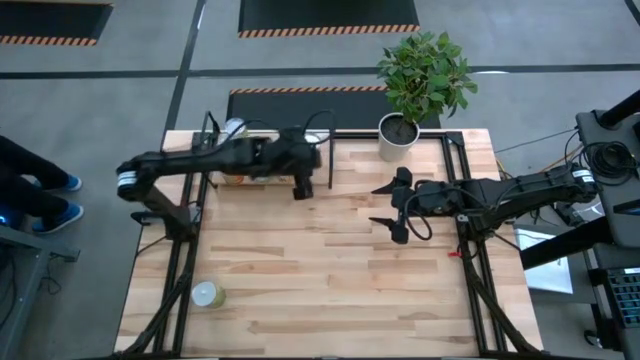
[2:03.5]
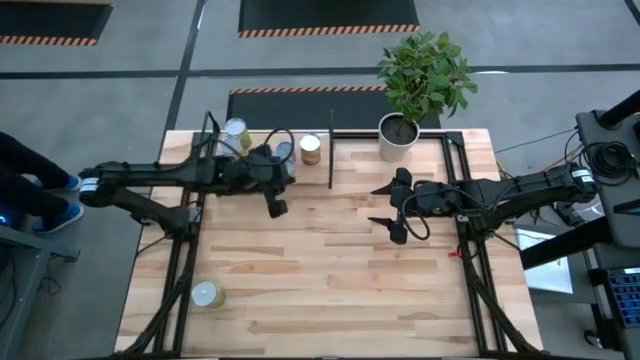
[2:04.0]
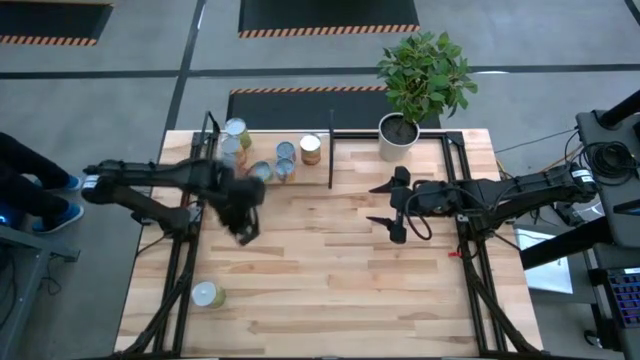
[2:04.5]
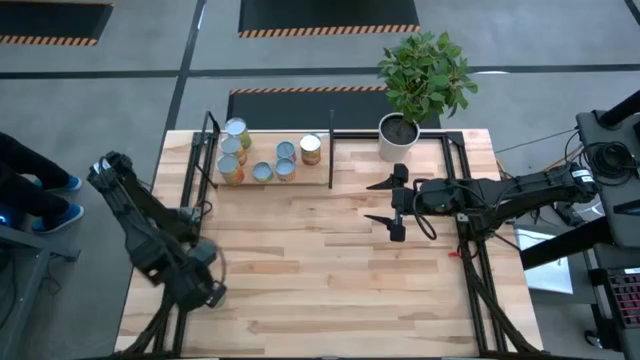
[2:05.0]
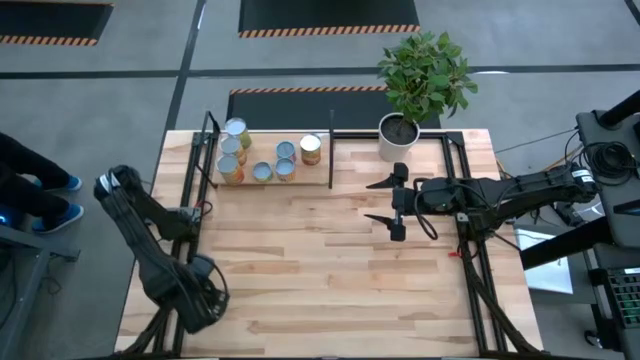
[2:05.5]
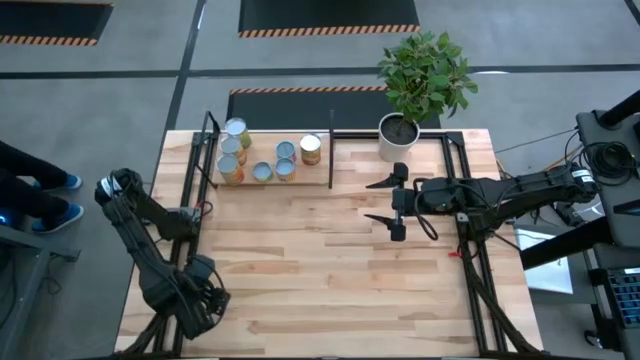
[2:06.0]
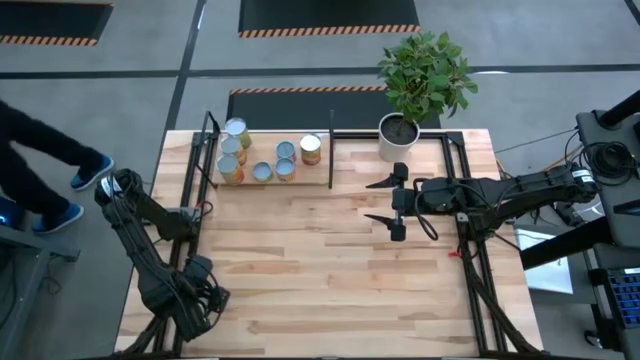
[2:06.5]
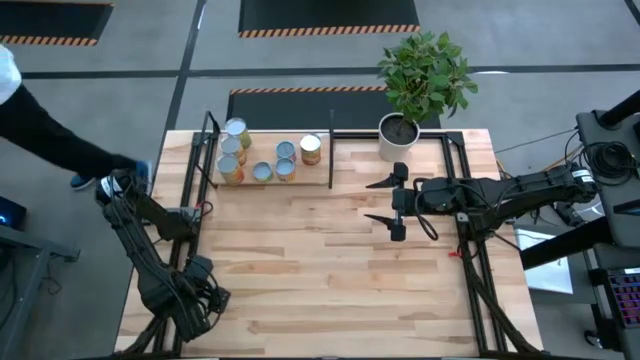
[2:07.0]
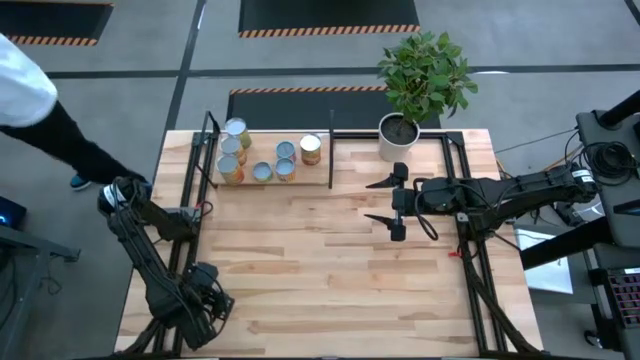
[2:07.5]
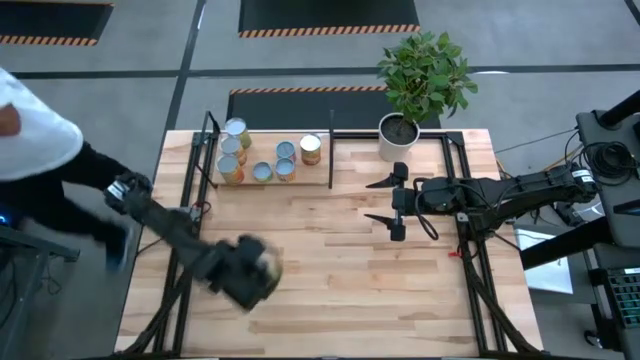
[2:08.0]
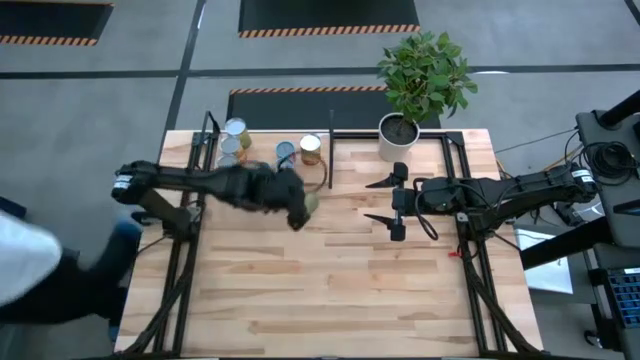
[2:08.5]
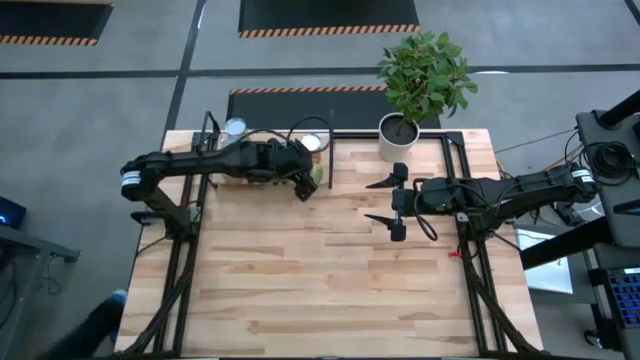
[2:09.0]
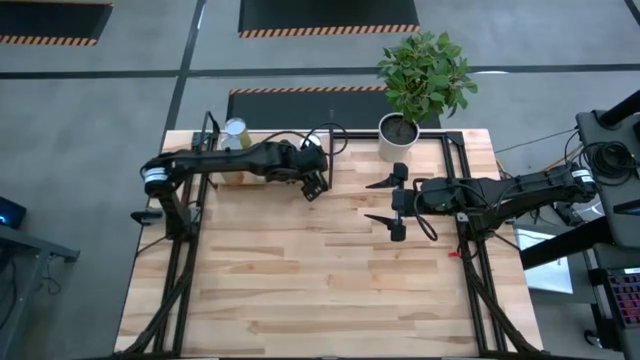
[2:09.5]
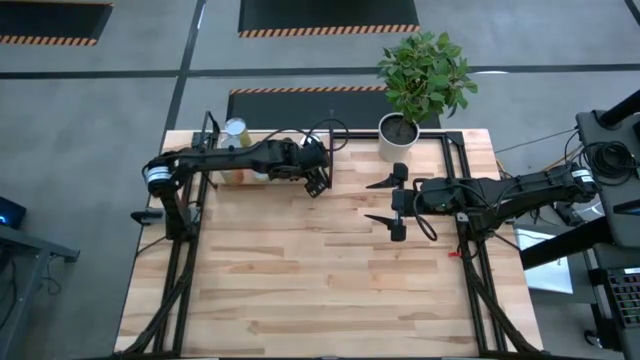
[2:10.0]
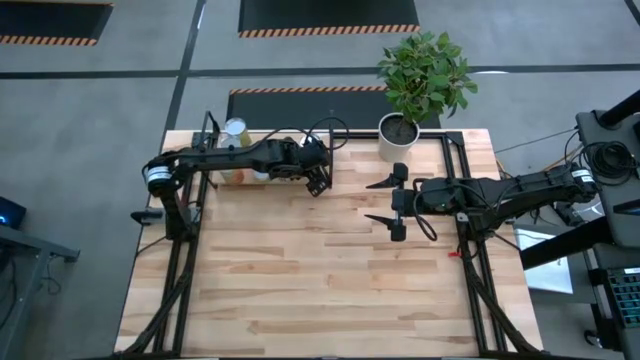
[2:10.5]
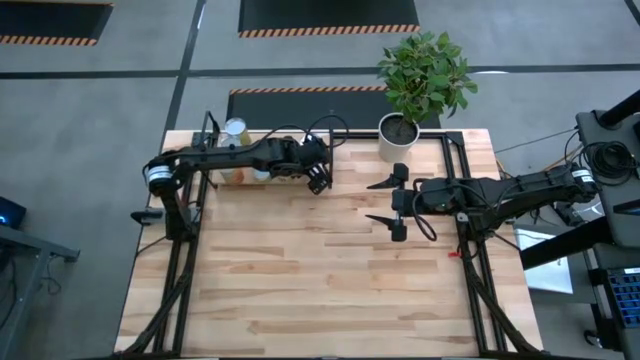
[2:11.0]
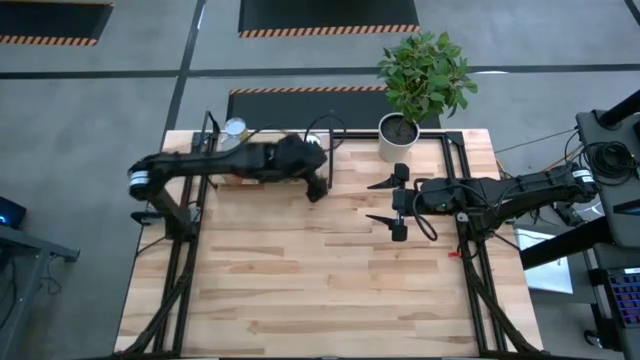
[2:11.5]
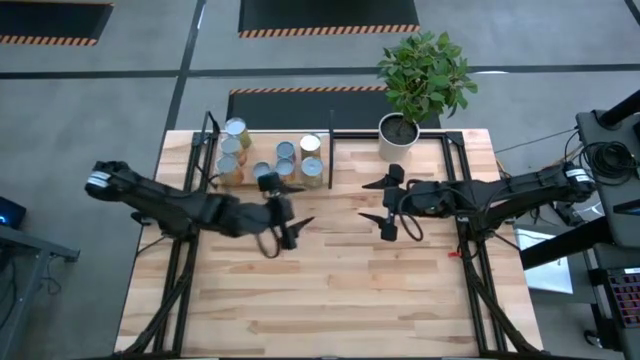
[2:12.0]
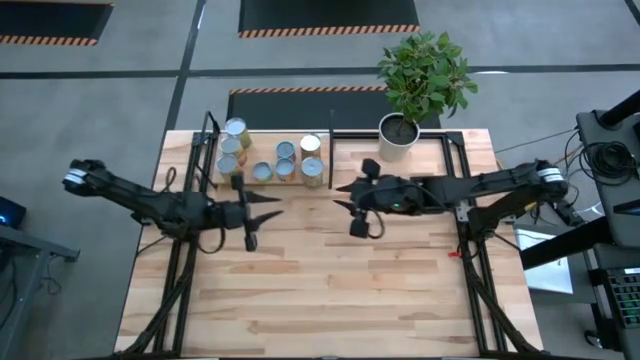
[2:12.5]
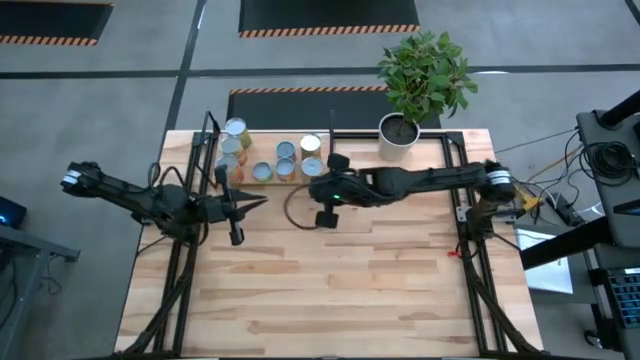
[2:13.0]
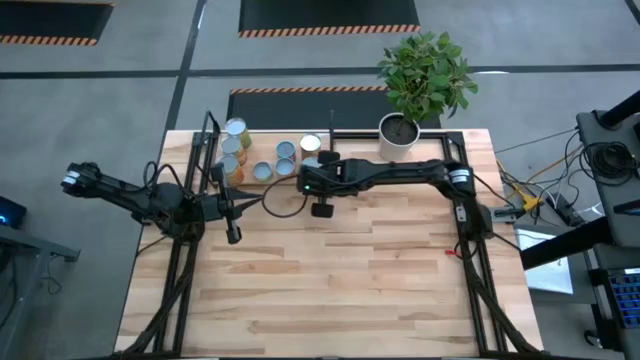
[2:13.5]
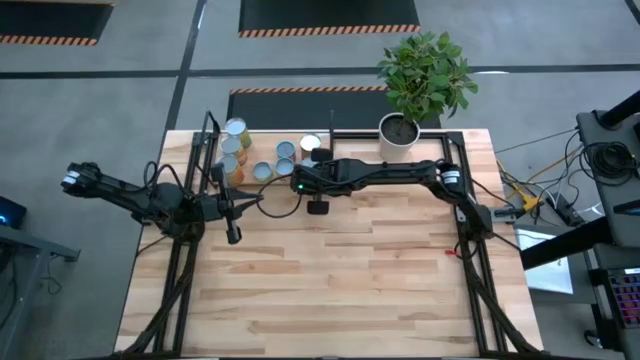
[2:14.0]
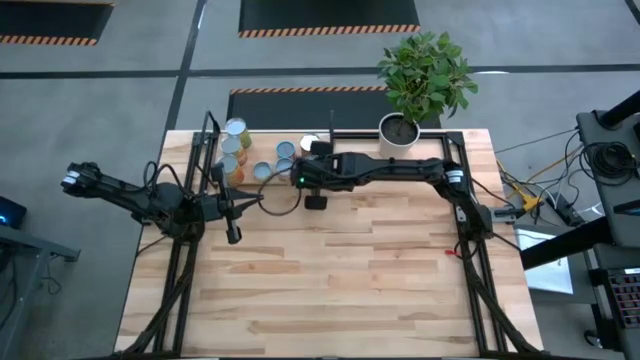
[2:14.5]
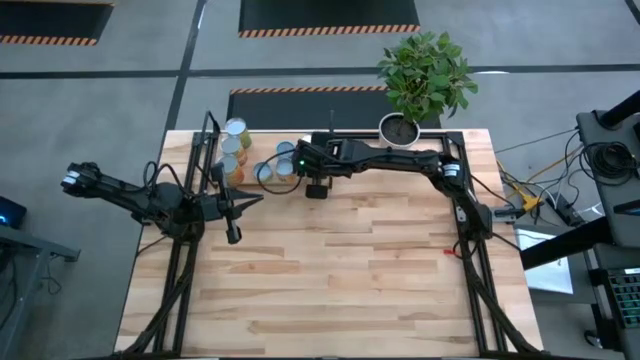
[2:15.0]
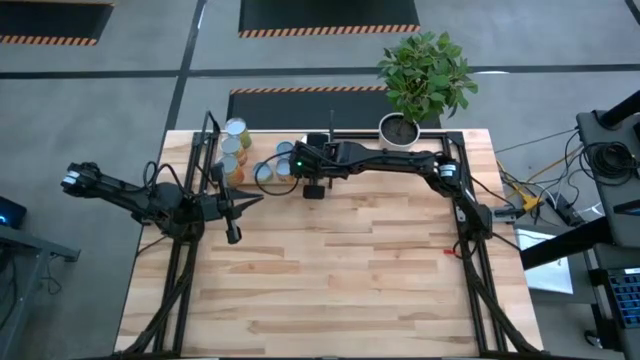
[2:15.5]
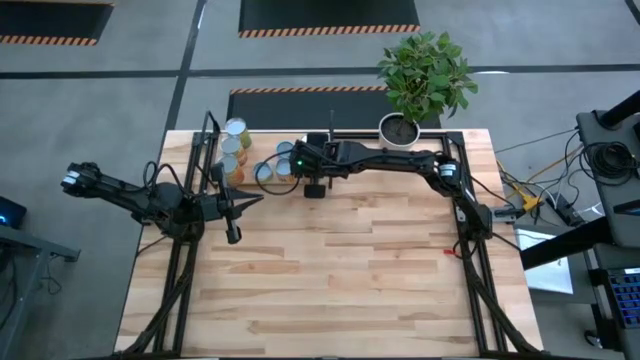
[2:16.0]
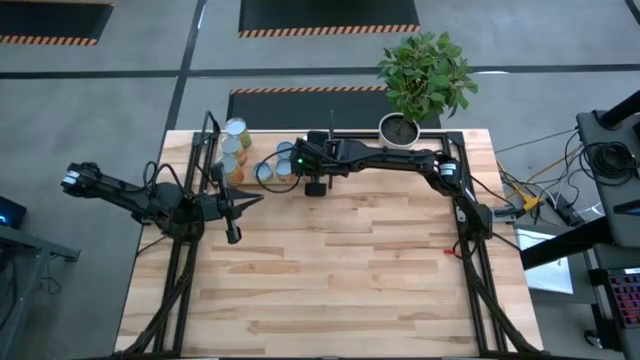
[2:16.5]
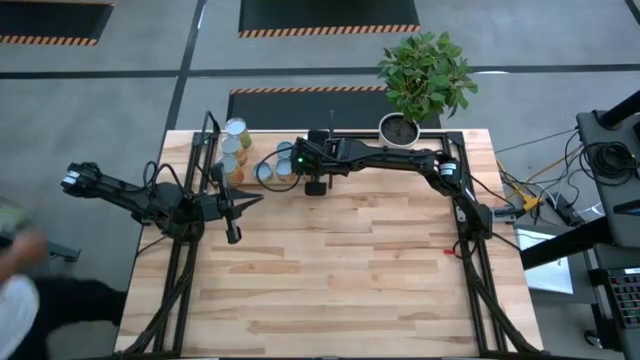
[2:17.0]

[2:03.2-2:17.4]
Task: Pick and place cans onto a shelf
Put the green oranges can on the shelf

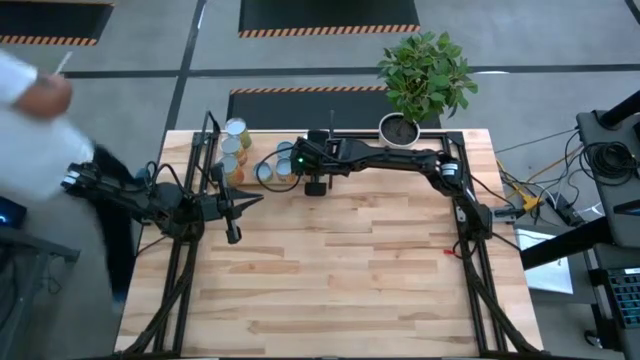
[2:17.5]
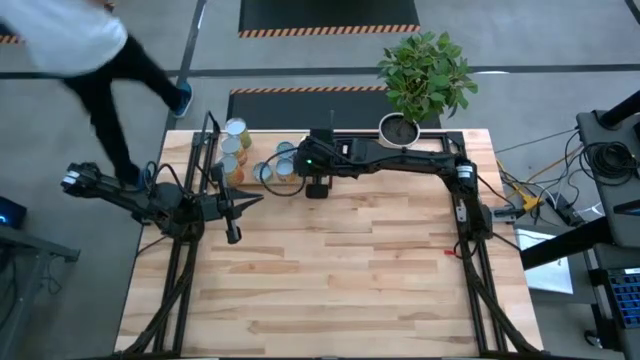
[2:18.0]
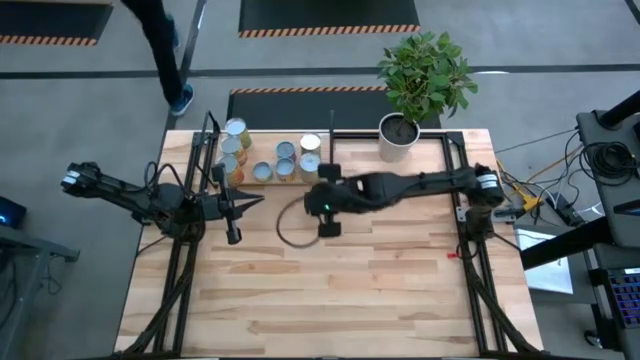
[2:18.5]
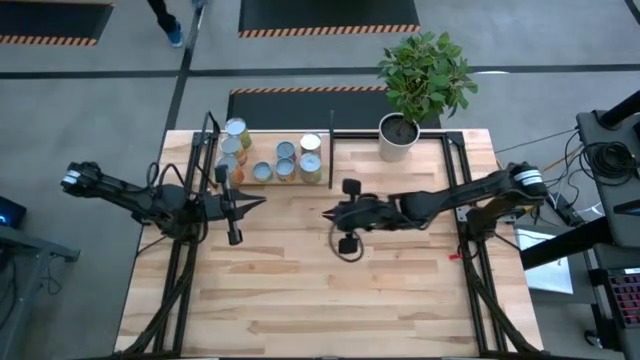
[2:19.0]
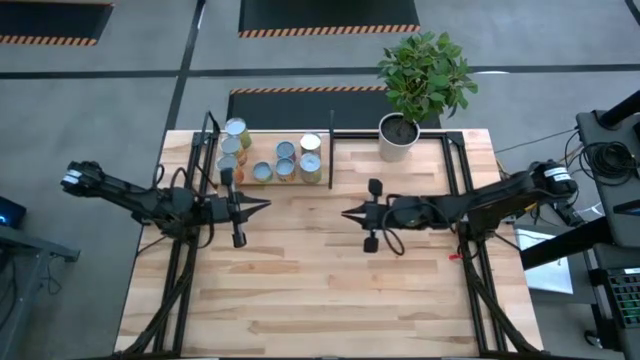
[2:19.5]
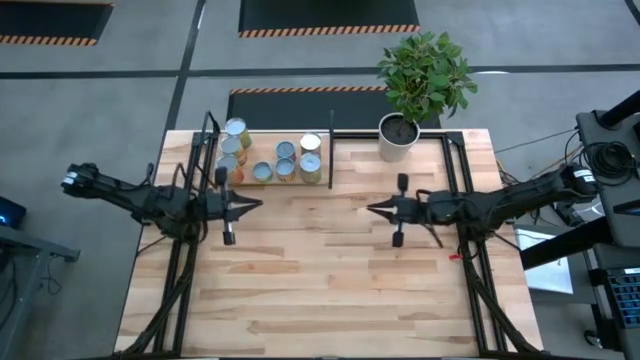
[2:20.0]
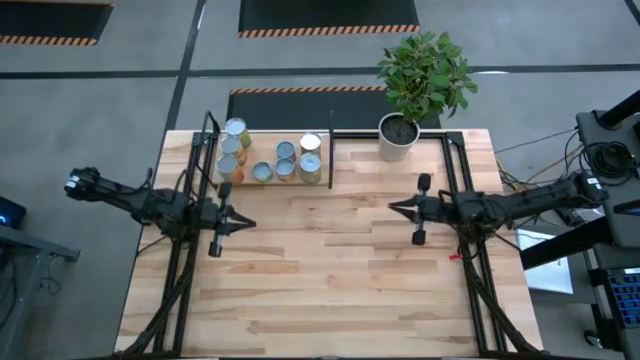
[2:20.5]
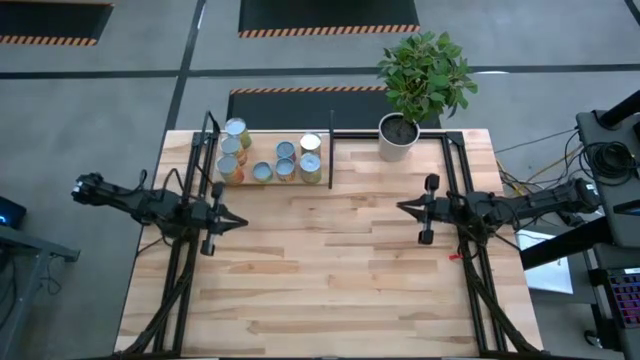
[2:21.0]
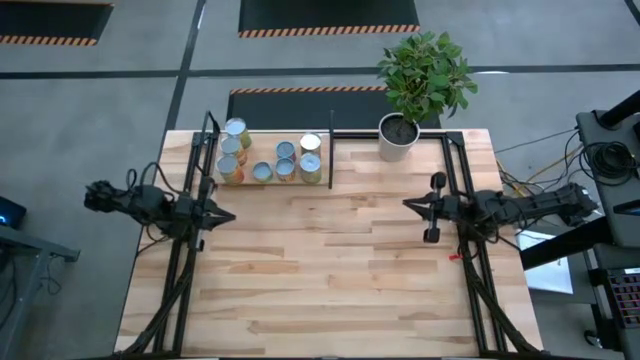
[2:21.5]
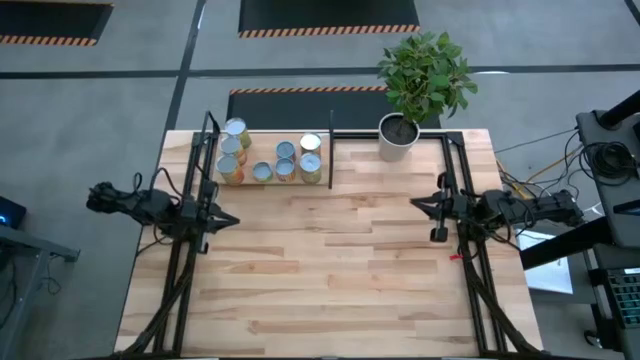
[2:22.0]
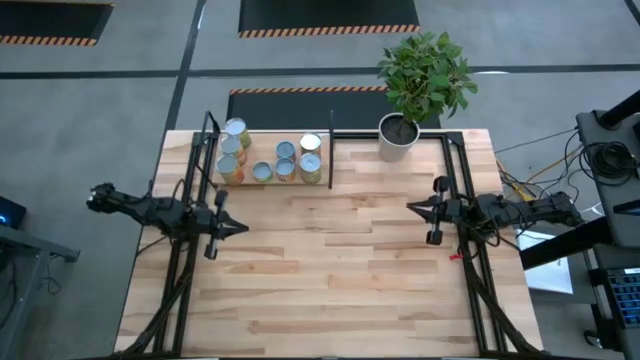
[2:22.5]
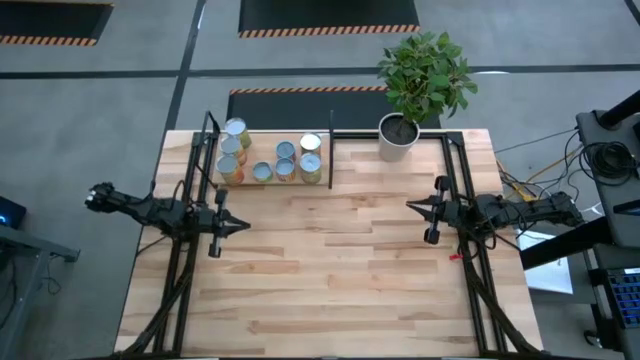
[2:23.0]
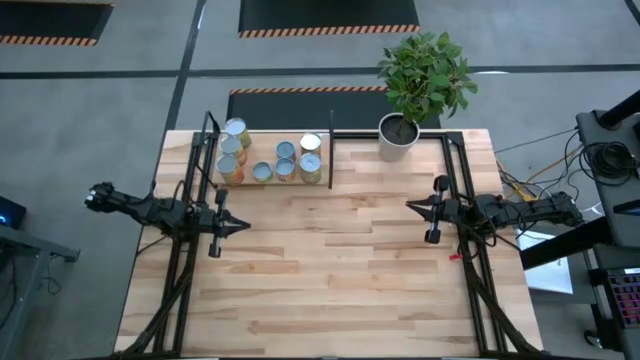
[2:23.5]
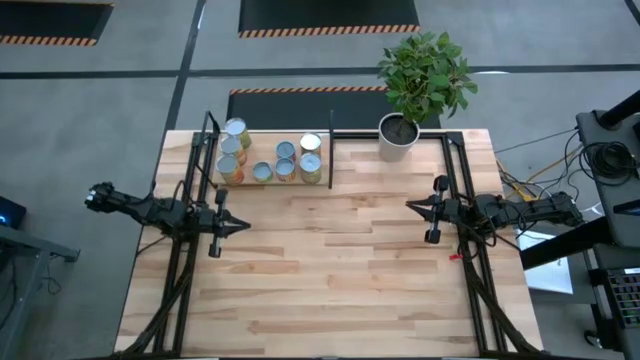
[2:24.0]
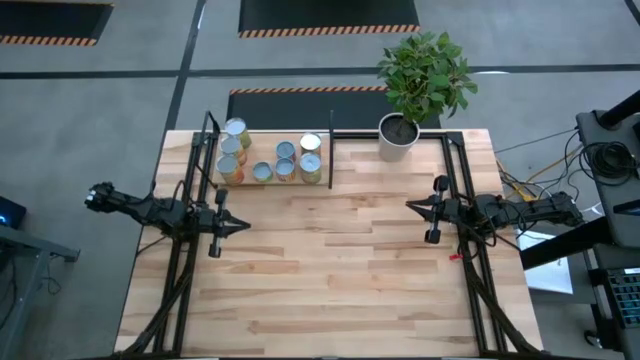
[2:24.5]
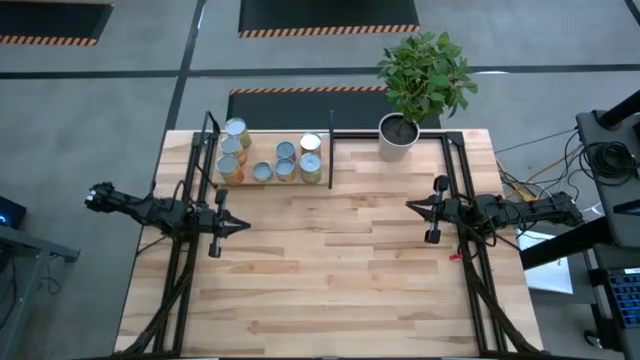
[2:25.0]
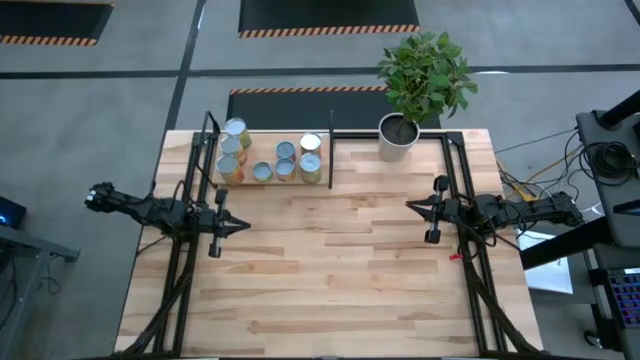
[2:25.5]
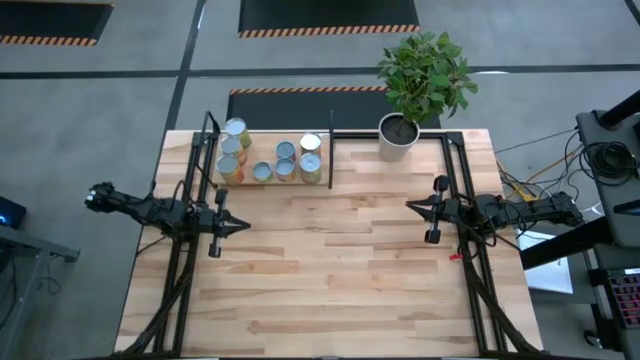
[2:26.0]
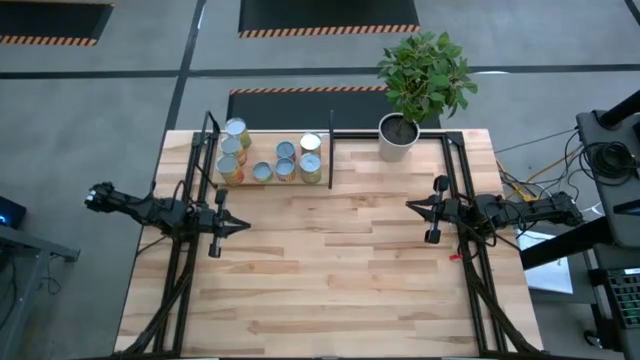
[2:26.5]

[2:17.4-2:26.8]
Return to Home Position
